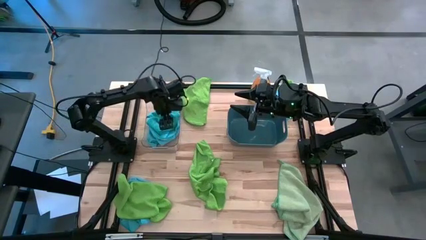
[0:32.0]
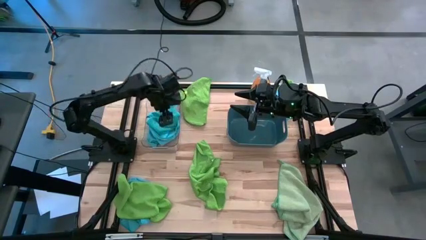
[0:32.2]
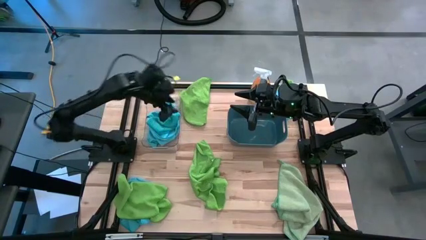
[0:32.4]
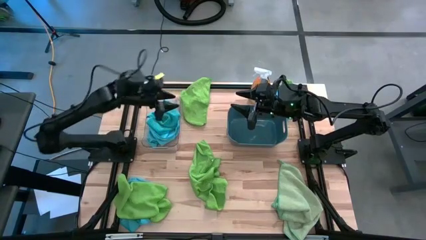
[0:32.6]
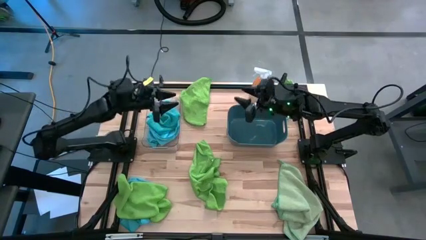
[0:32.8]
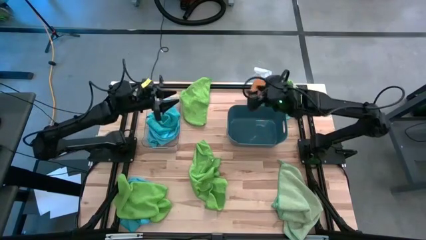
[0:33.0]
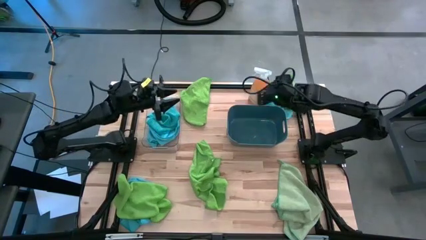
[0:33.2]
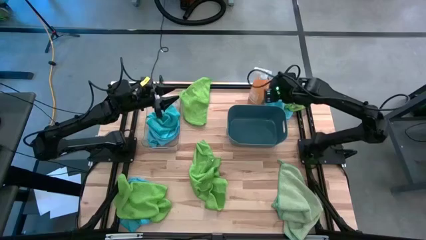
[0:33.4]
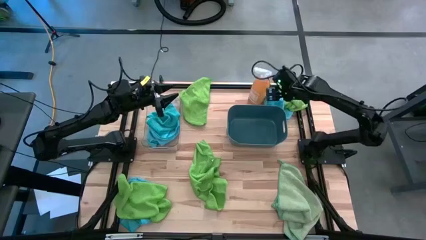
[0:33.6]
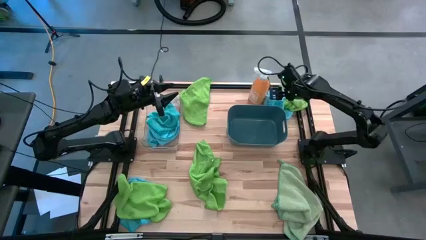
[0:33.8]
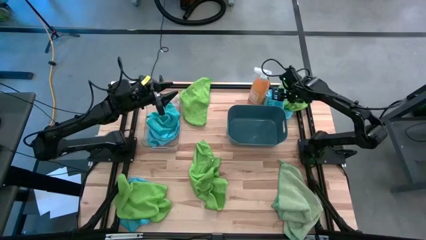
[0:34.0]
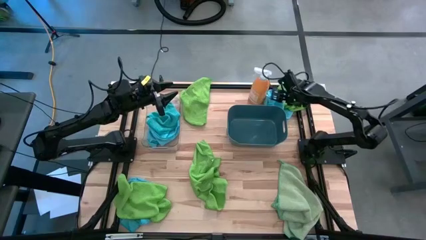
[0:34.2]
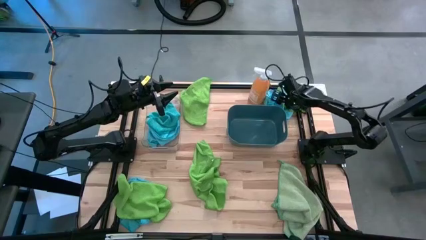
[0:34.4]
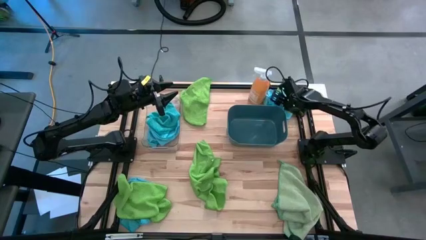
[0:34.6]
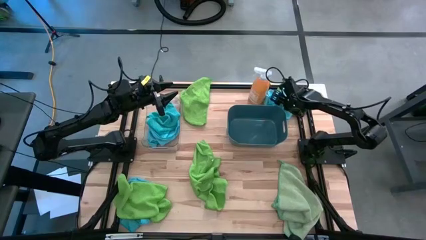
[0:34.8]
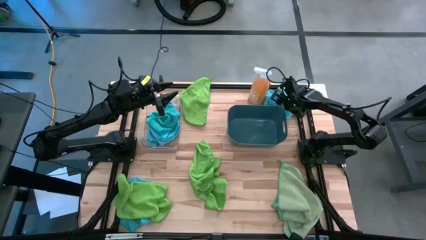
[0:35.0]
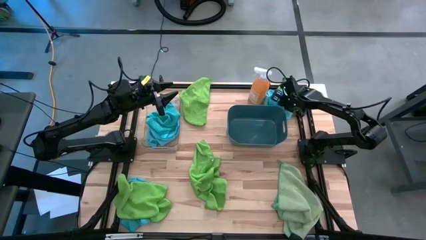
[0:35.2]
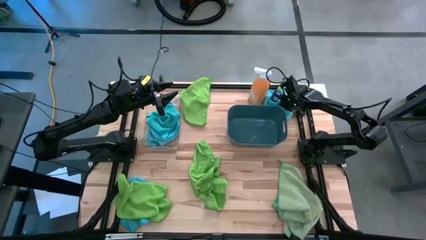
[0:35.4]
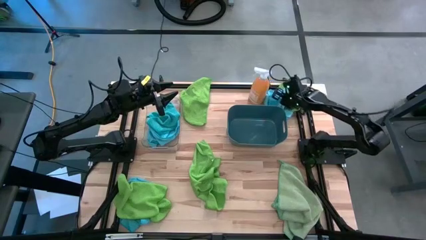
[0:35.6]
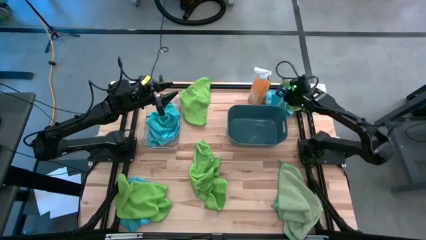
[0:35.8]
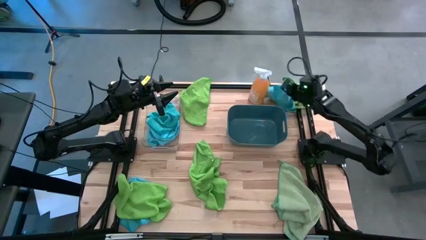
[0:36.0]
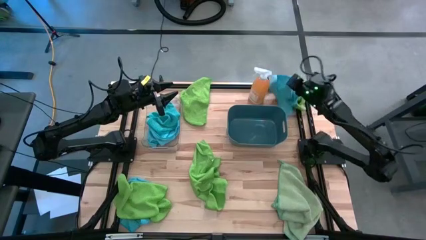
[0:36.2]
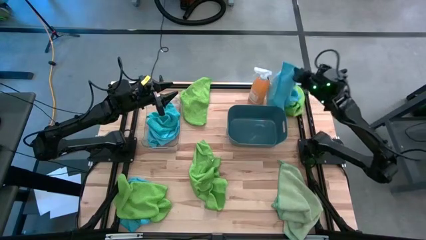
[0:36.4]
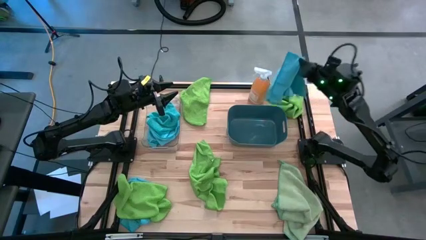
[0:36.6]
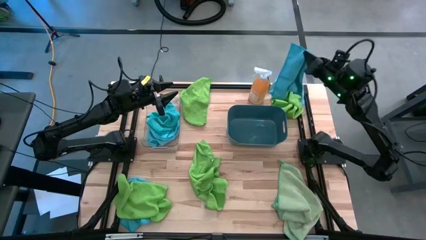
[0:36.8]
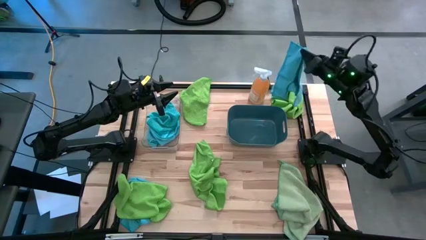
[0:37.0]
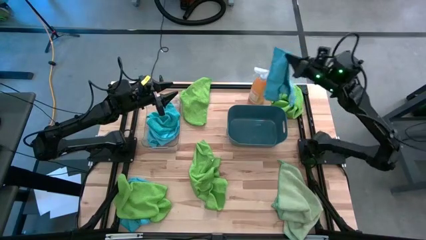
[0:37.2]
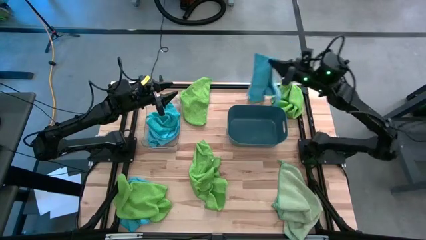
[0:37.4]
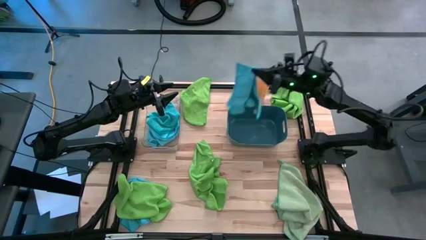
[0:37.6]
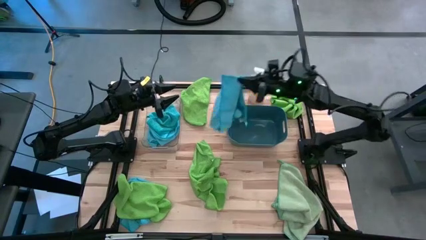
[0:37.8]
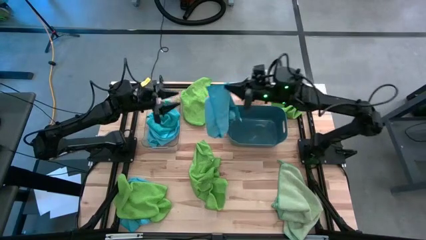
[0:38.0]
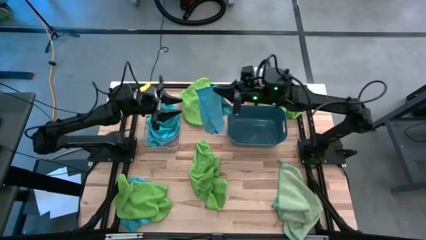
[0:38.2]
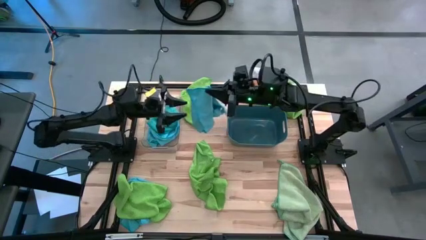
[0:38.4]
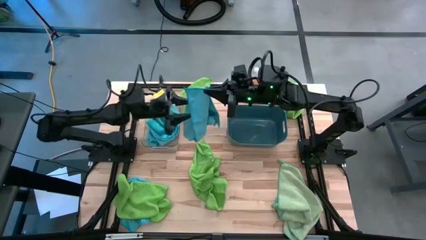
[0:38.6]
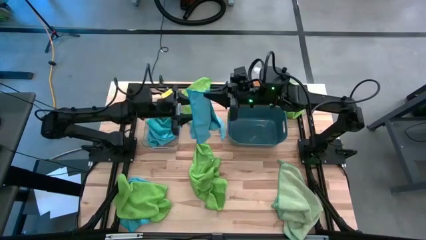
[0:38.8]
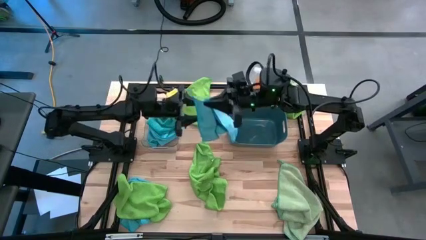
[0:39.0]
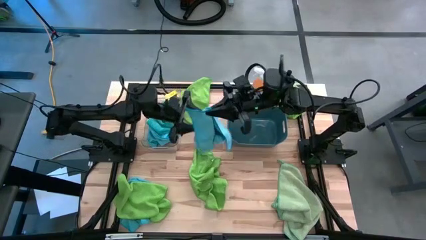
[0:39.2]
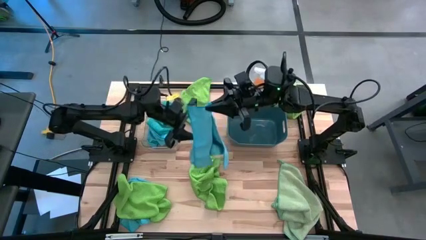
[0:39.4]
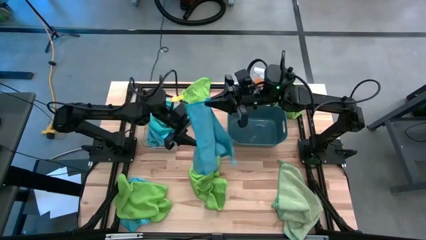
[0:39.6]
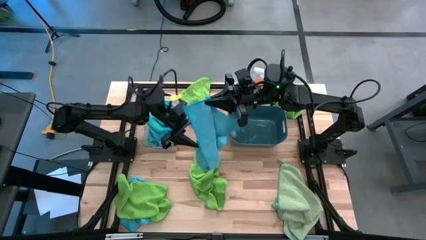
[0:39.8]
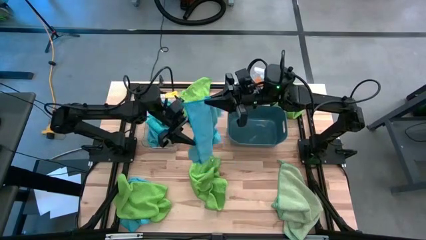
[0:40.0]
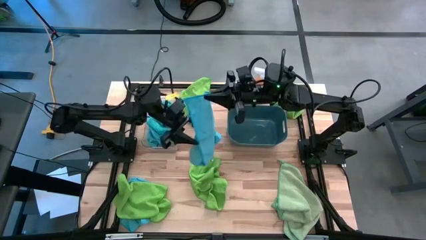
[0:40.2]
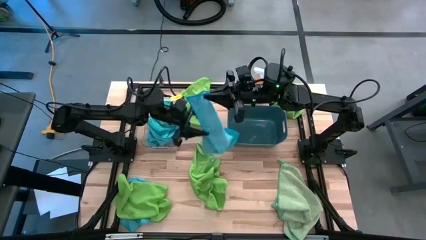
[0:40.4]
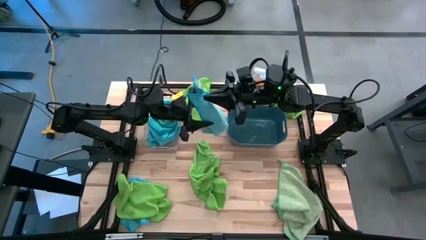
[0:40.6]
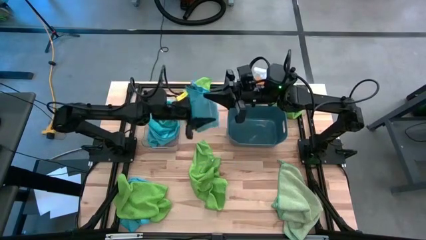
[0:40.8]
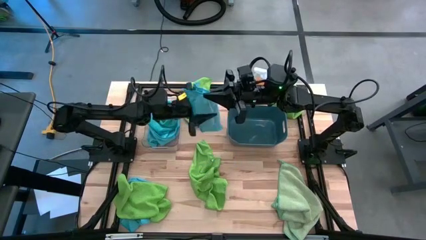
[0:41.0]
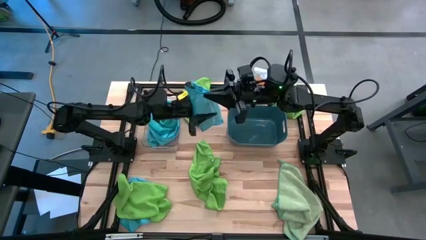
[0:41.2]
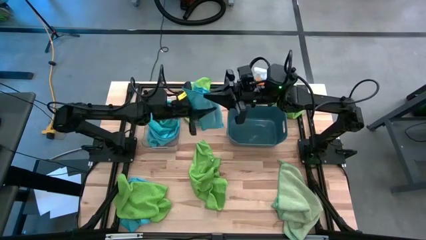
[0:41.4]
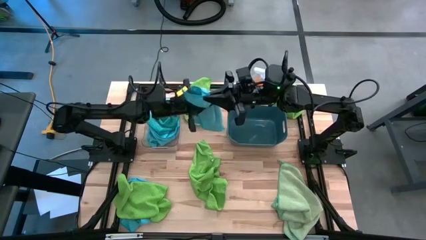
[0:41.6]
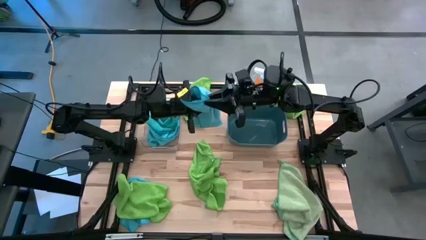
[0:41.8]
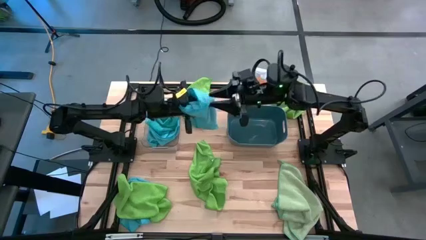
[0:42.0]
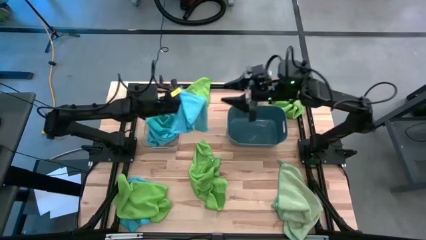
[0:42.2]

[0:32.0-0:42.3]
Task: Sort microfiber towel by color & place in baskets
Put the blue microfiber towel into the transparent bin

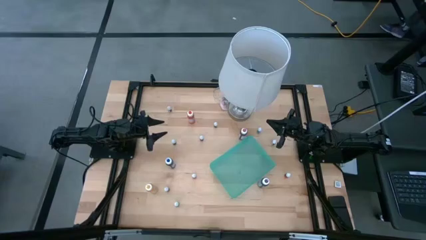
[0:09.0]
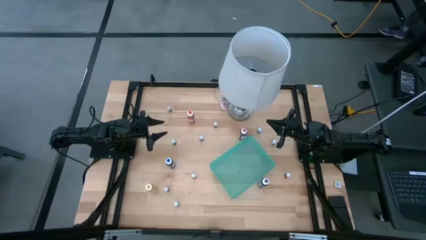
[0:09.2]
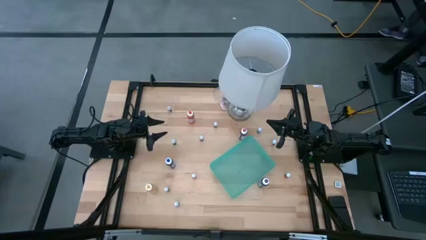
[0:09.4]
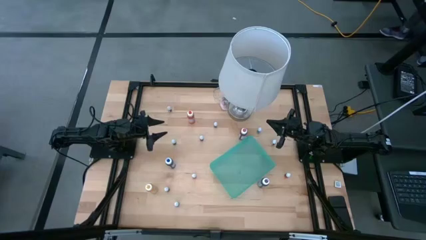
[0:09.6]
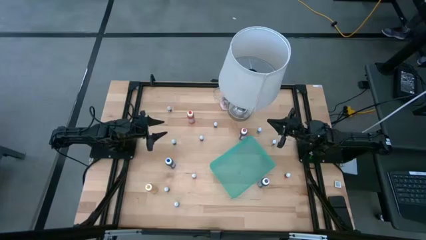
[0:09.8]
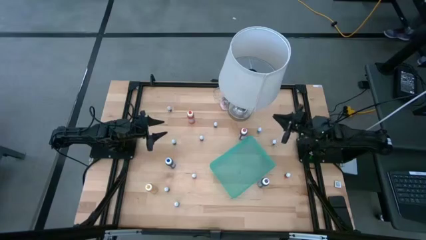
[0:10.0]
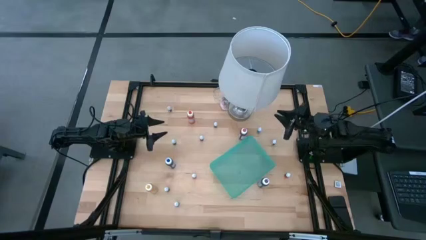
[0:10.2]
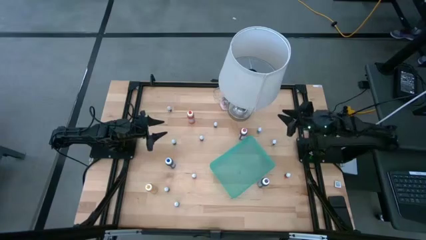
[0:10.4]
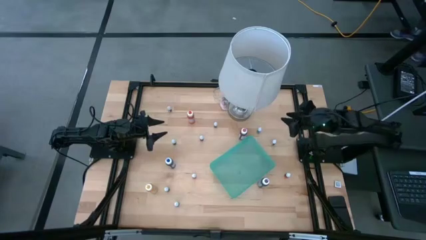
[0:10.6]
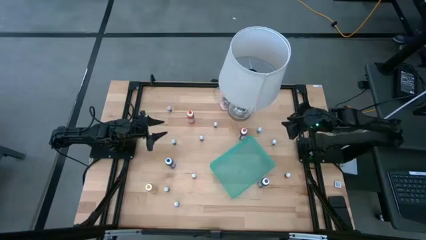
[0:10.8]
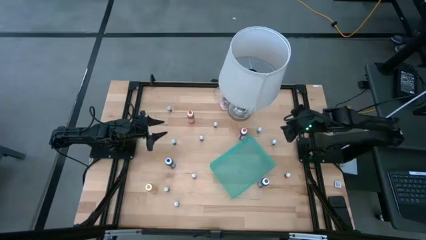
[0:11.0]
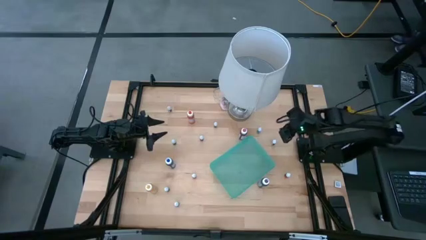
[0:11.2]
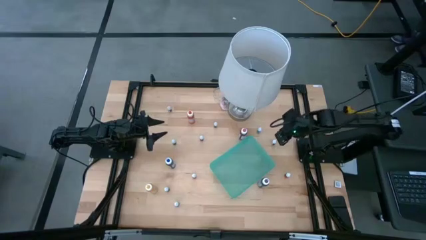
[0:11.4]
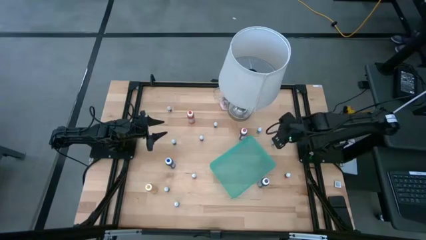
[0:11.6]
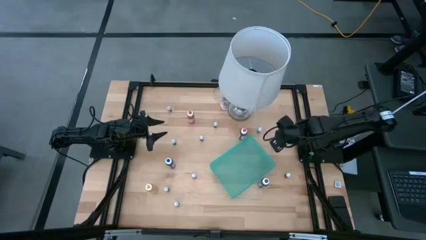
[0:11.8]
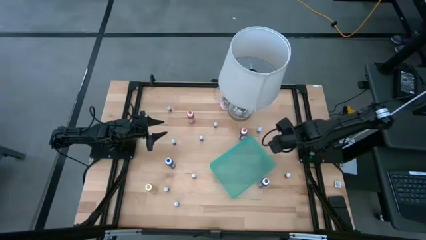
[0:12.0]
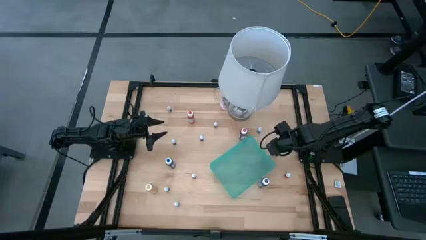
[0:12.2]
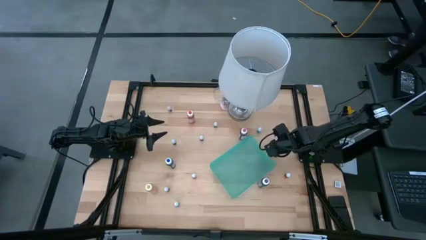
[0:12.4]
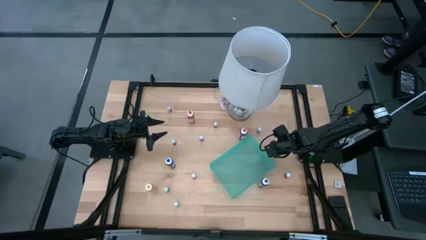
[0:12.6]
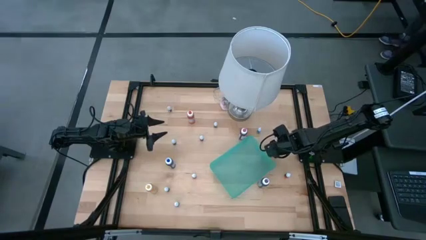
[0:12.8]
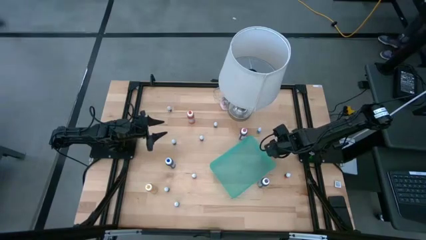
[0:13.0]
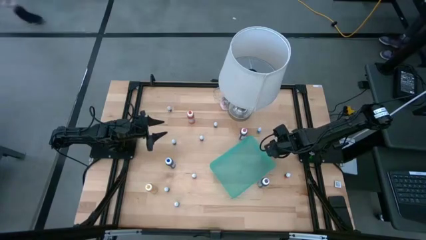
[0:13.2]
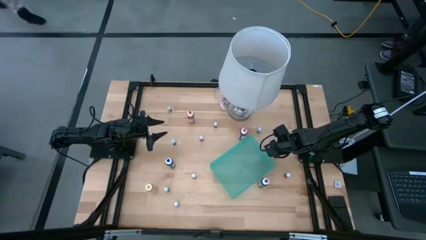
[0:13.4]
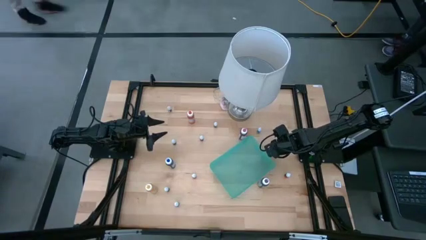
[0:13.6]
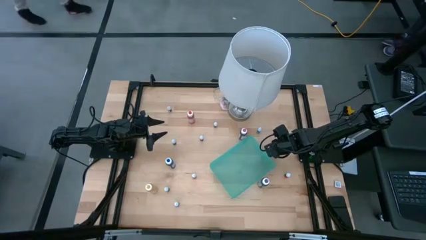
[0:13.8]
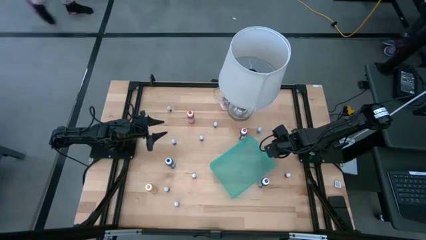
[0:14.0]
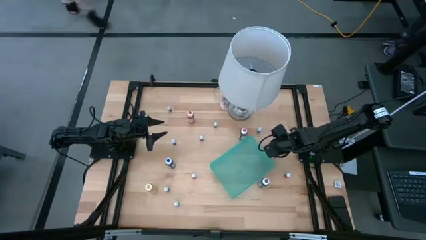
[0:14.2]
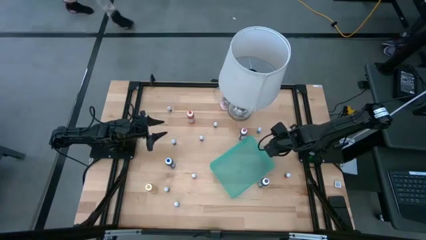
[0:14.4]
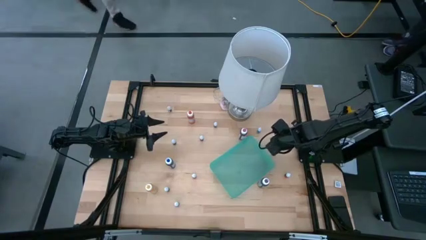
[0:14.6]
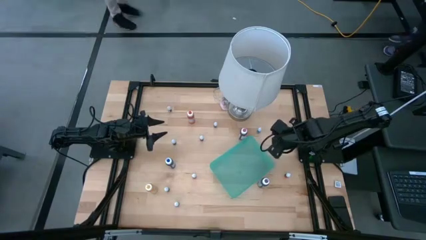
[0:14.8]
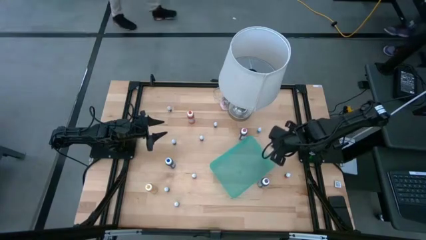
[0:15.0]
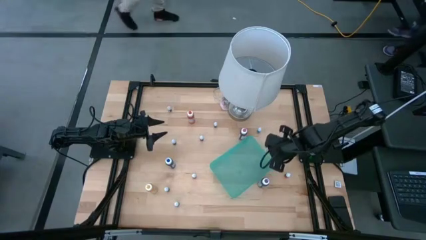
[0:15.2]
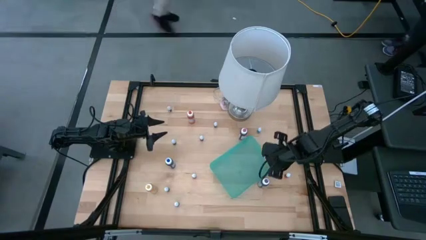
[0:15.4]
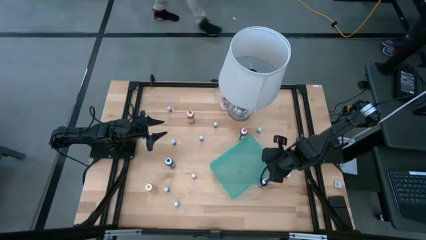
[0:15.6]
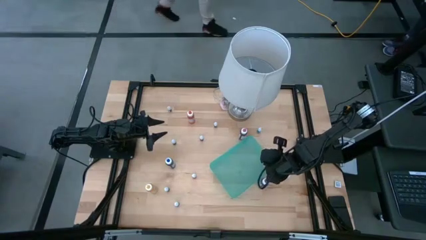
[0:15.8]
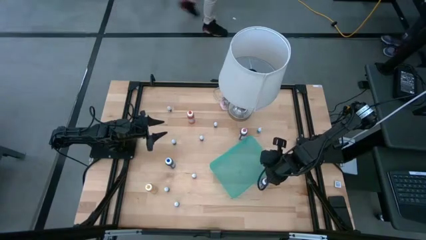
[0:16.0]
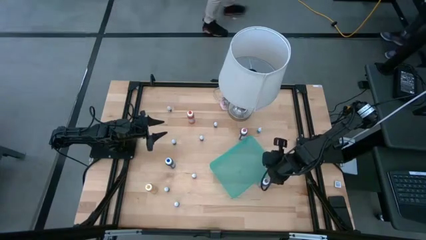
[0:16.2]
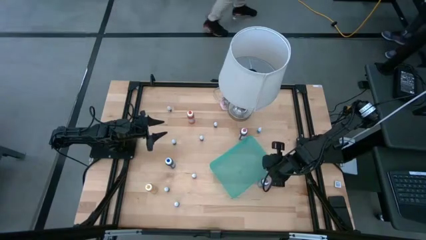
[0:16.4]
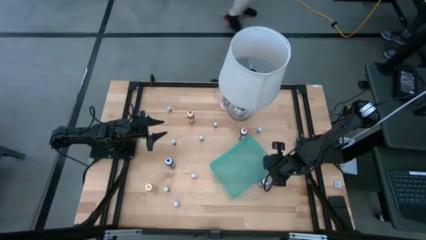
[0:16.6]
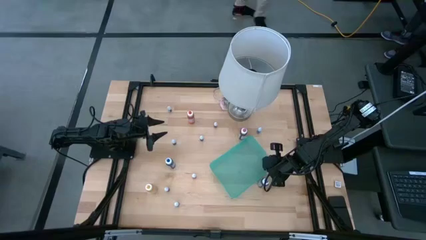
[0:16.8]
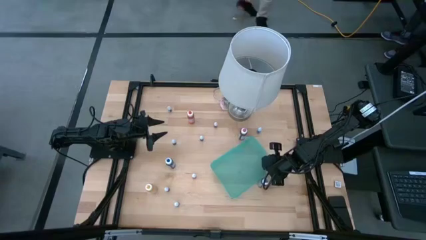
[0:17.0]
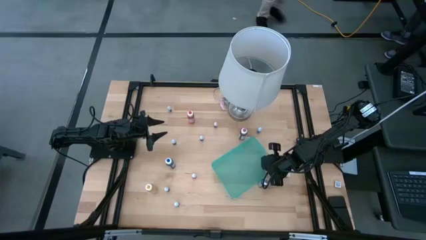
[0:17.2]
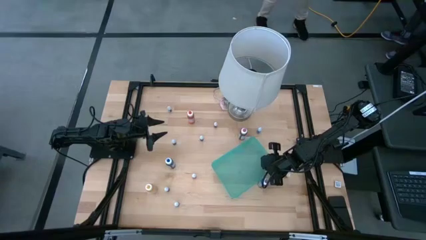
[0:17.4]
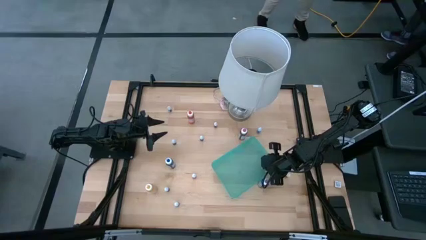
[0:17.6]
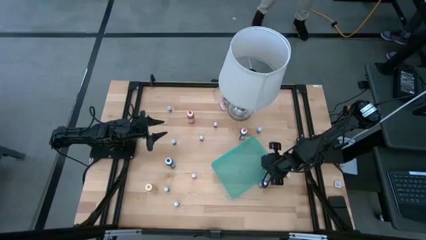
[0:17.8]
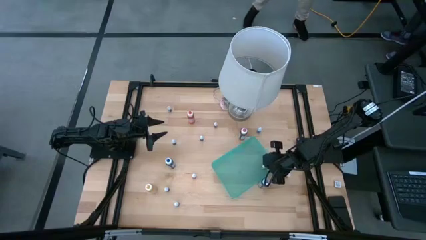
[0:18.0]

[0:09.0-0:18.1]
Task: Pick & Place food coloring
Put the small pink food coloring bottle into the green bin
